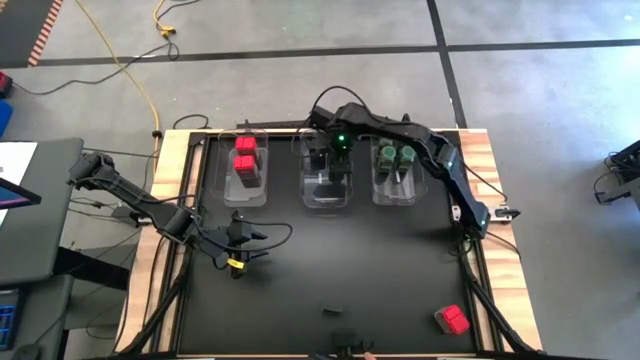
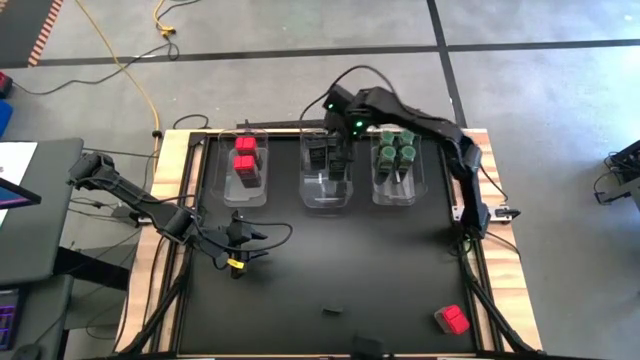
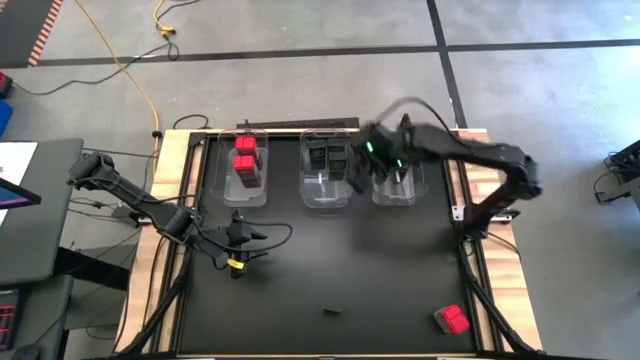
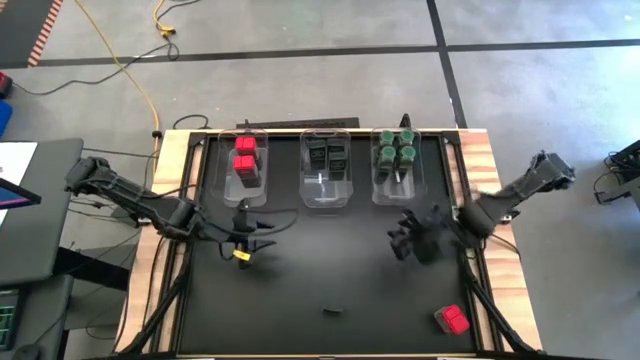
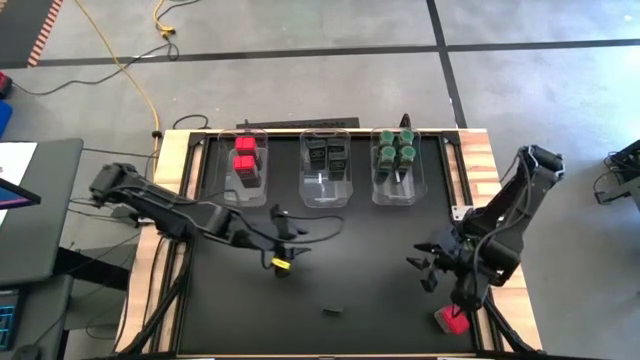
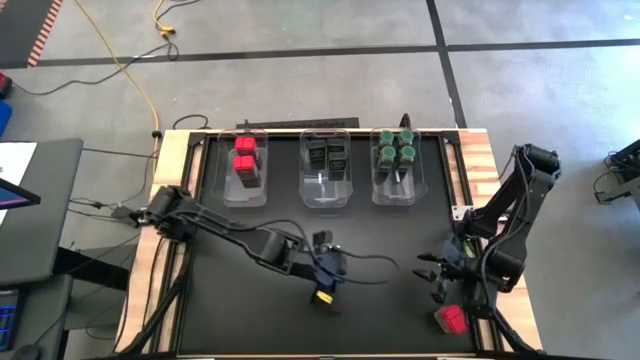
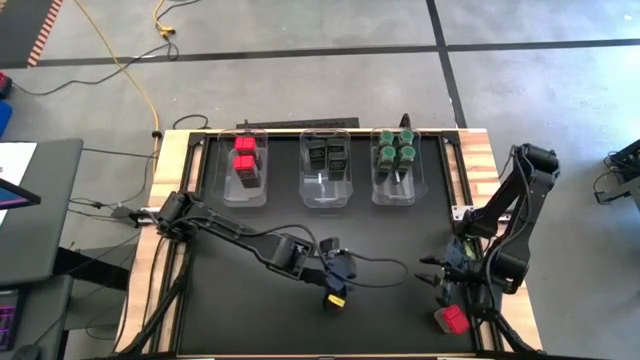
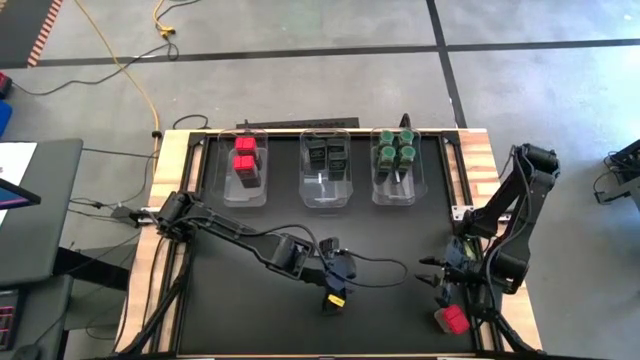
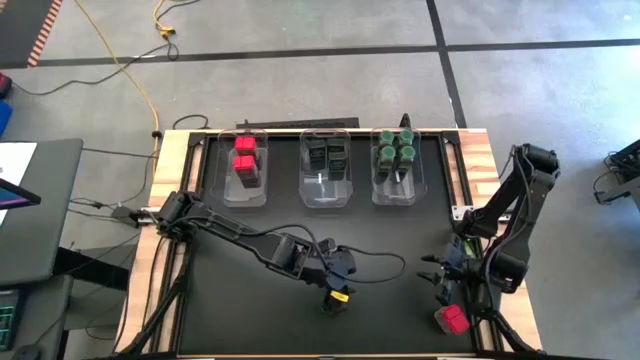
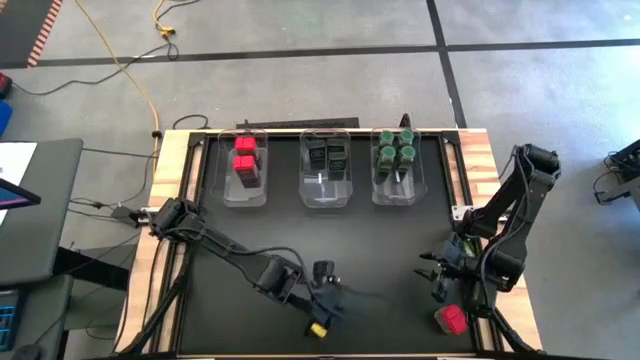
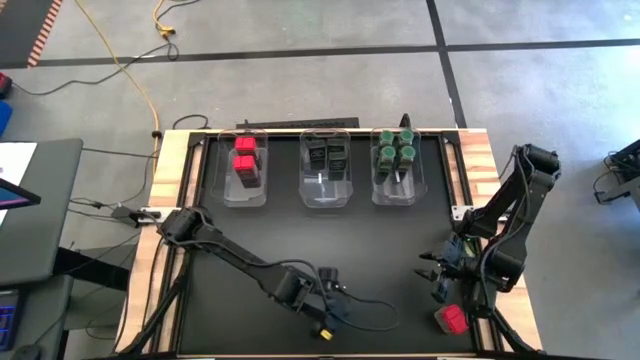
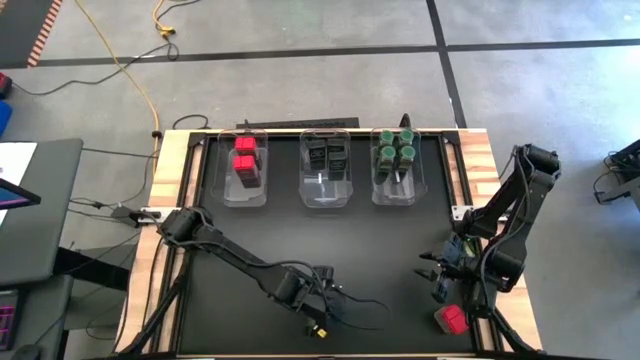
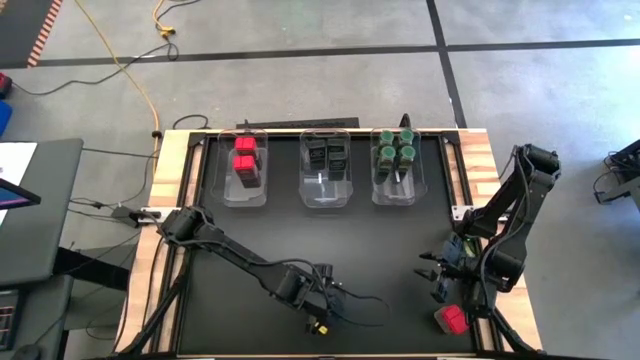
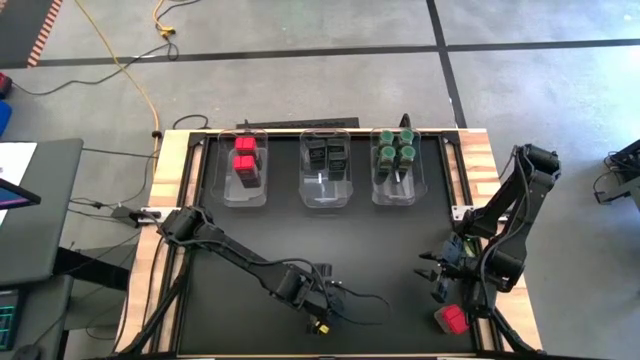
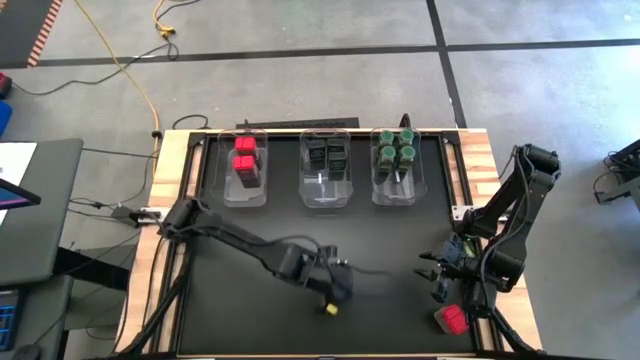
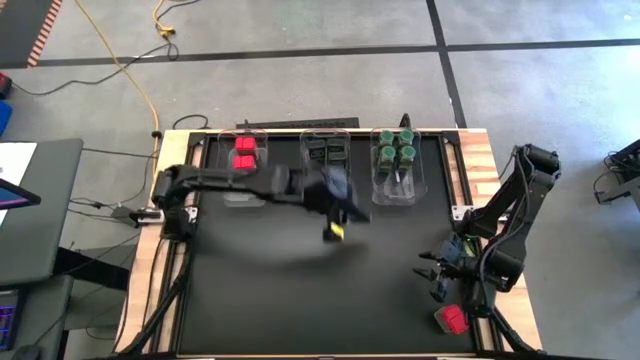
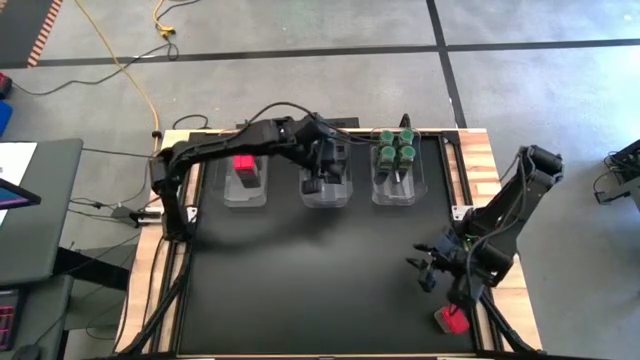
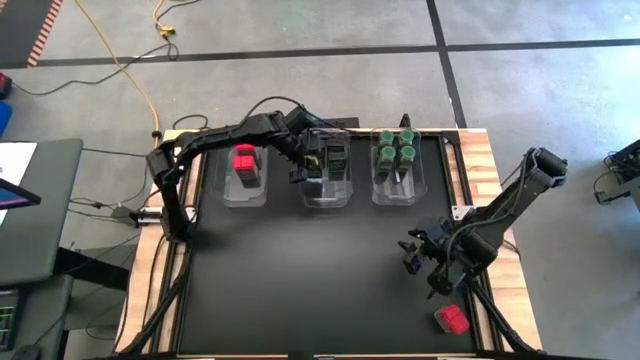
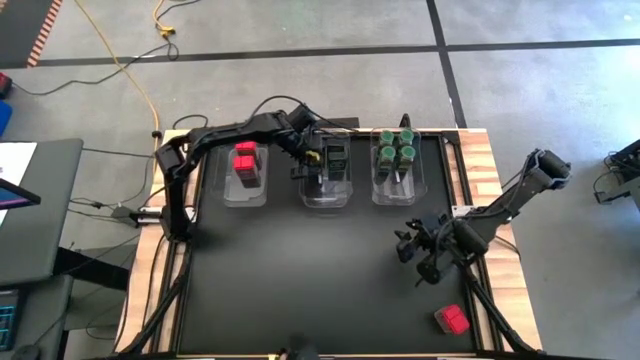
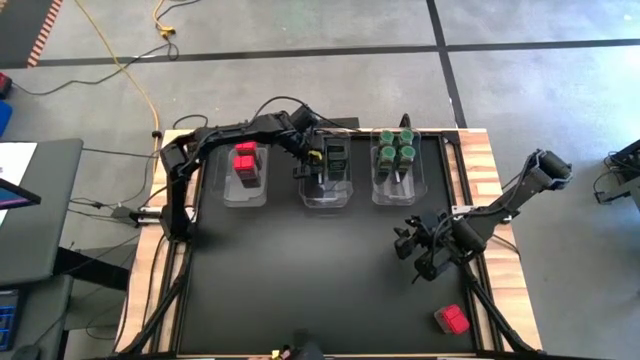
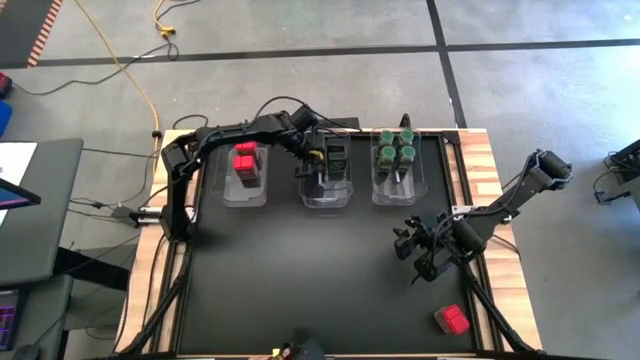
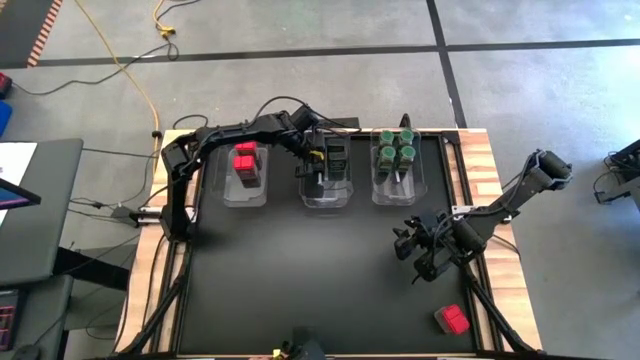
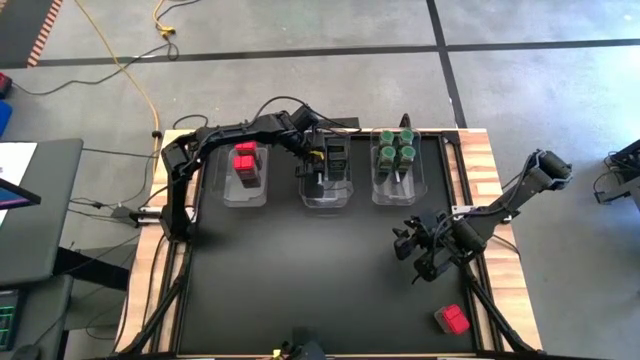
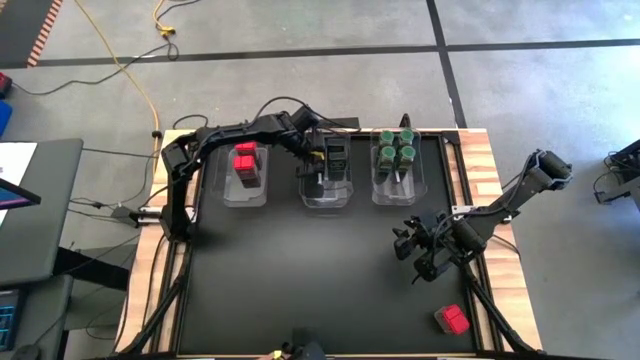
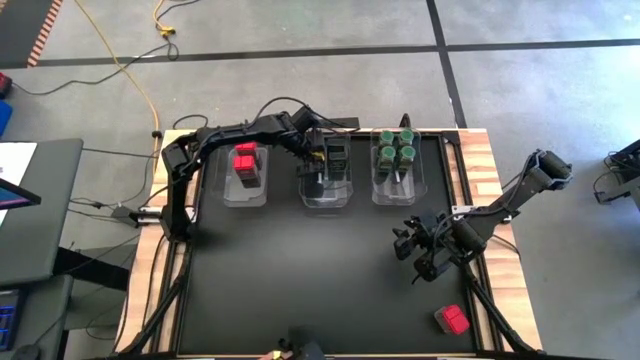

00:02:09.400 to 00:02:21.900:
Task: Sort spices by type
Put the black seasoning can into the middle transparent bin

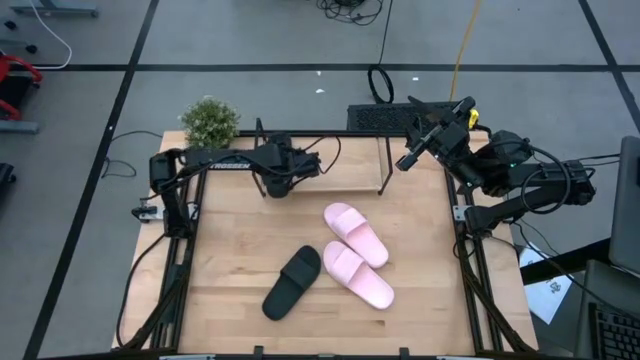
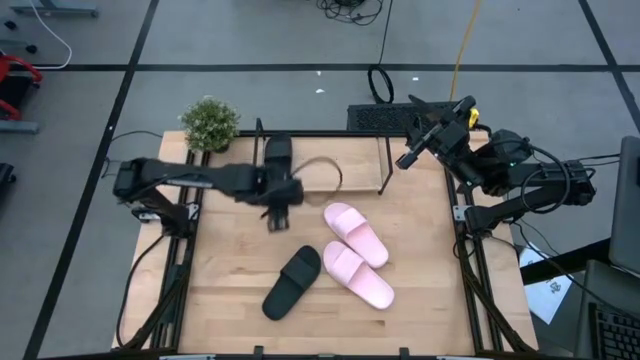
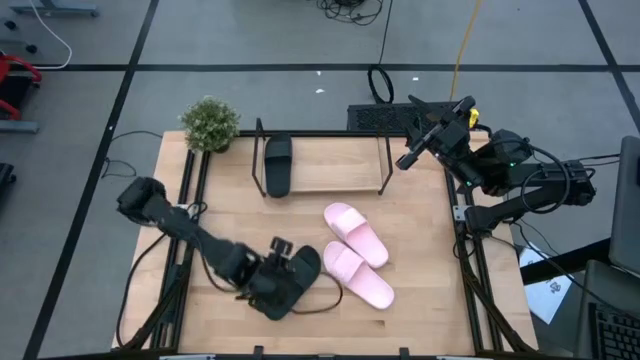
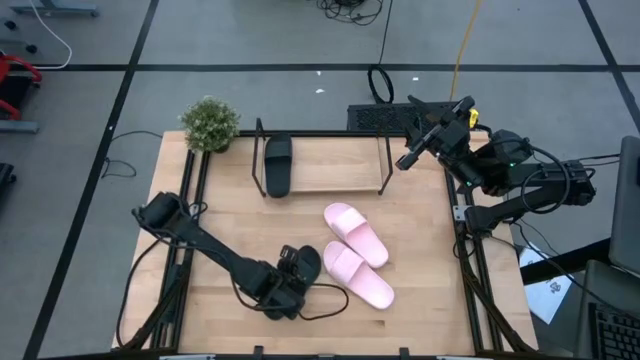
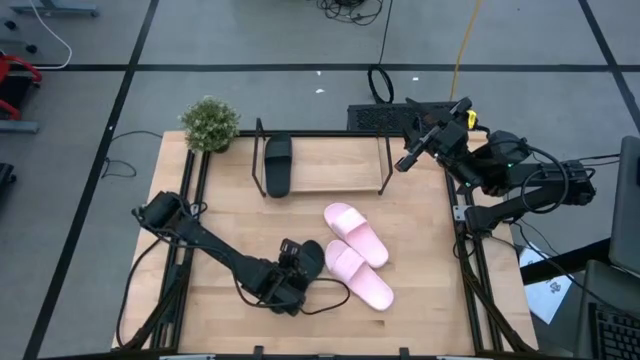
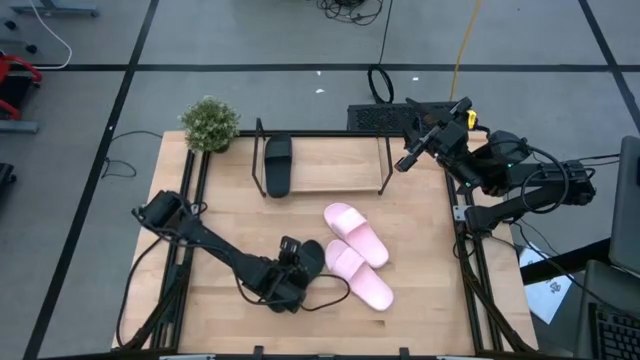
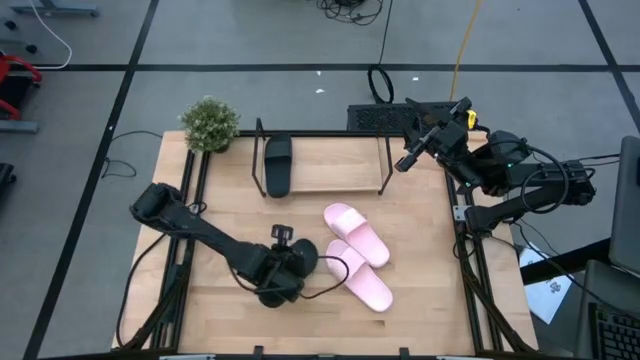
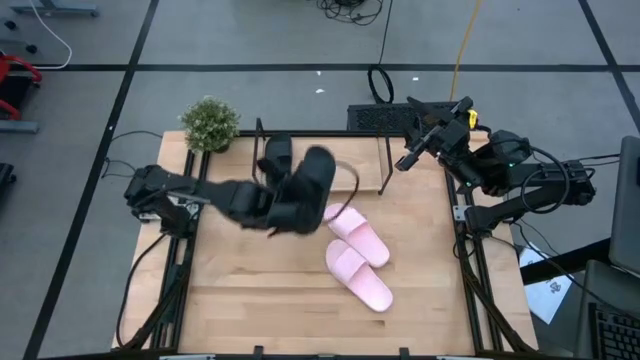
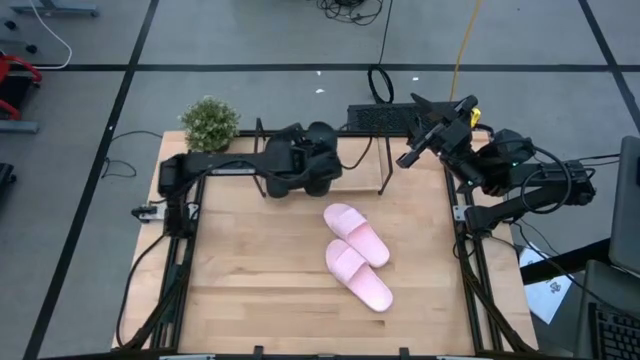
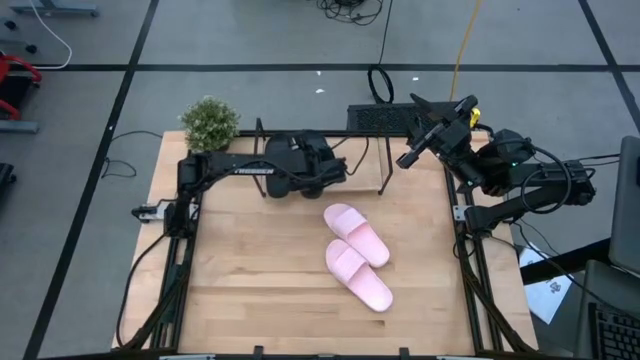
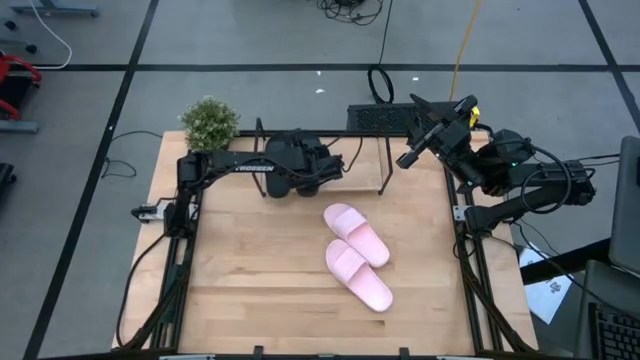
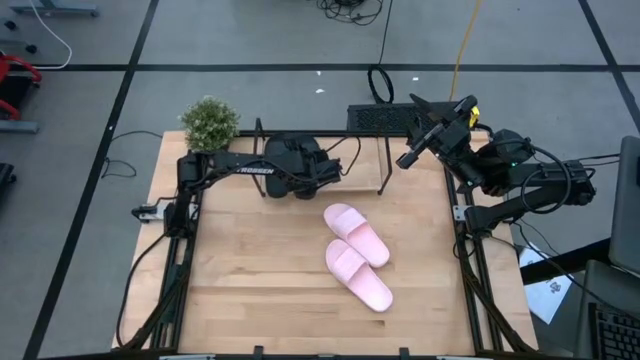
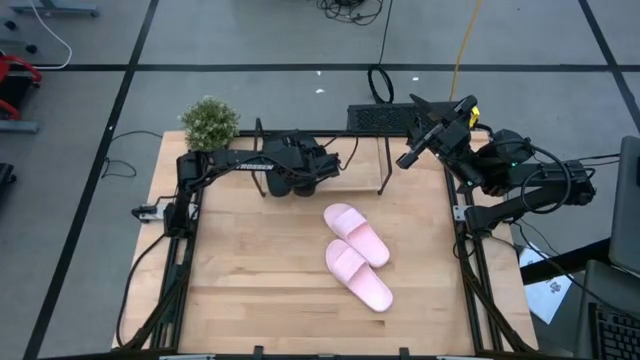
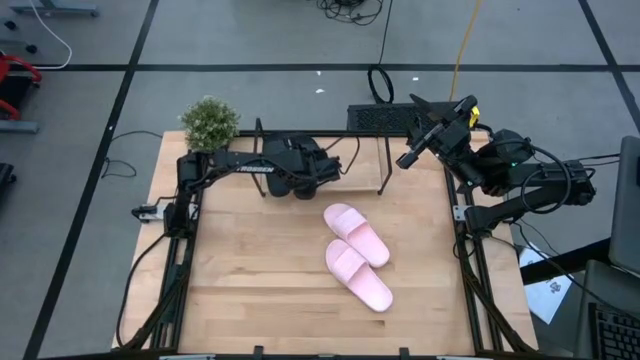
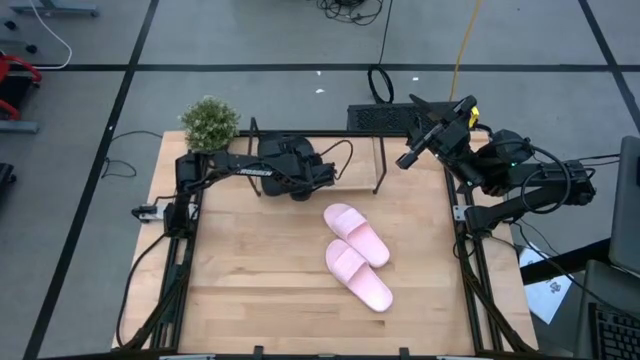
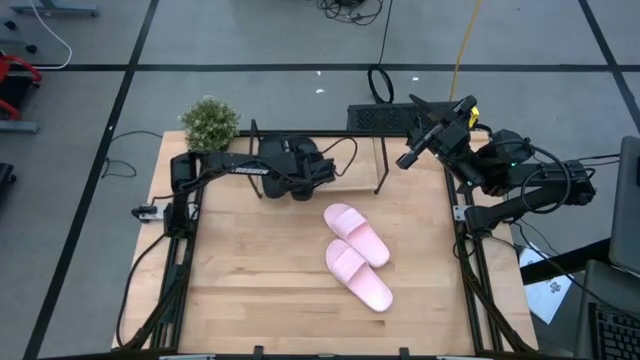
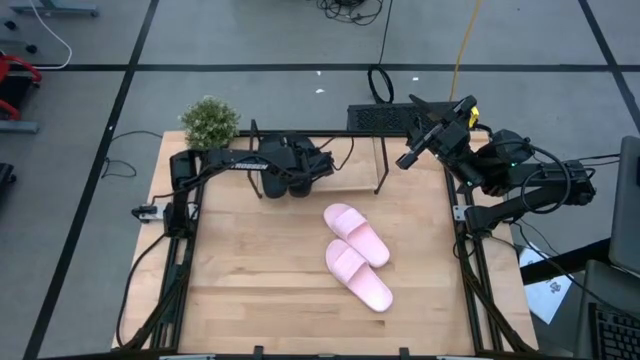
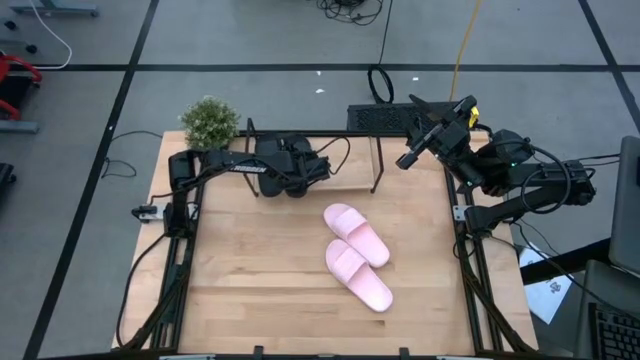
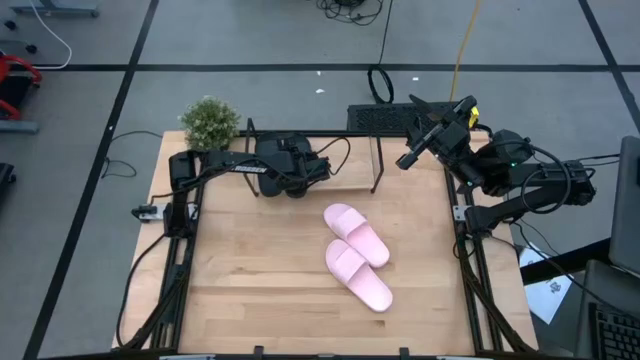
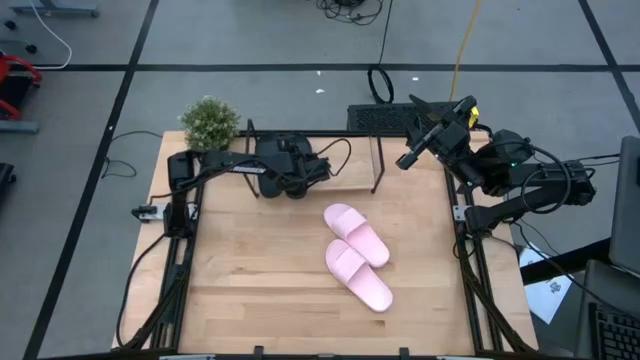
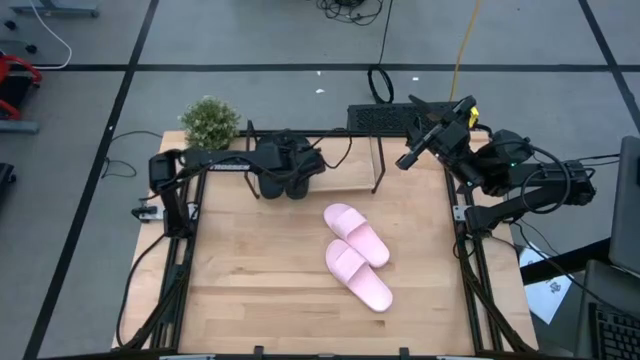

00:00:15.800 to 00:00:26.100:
Task: Pick and place slides into the shelf
Put the black slipper on the shelf
